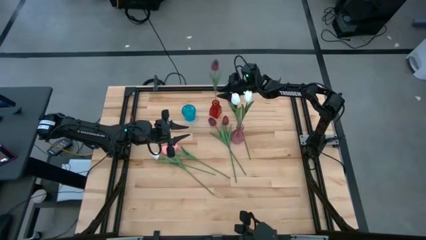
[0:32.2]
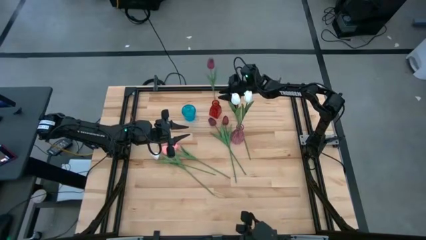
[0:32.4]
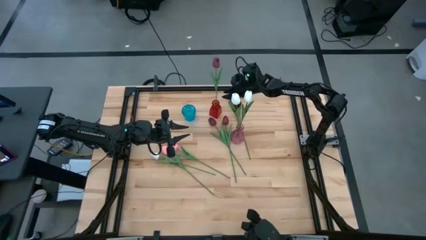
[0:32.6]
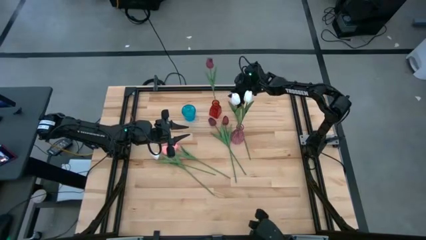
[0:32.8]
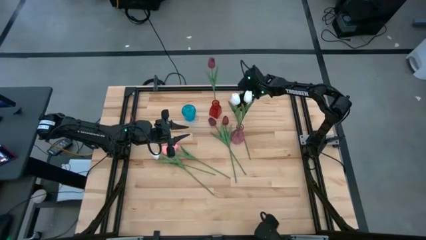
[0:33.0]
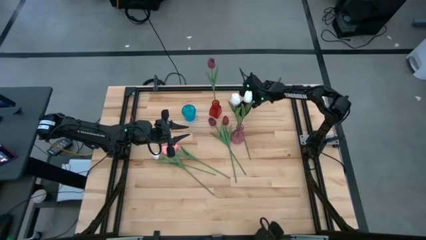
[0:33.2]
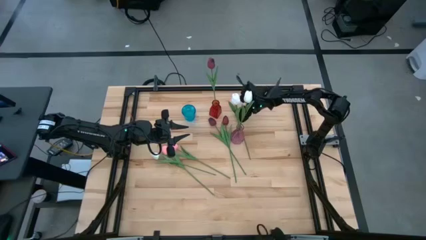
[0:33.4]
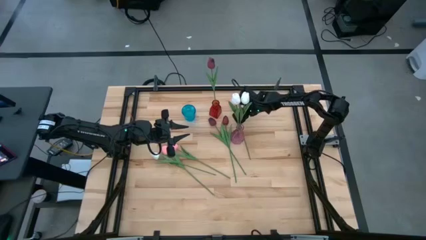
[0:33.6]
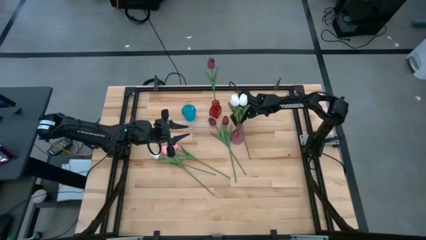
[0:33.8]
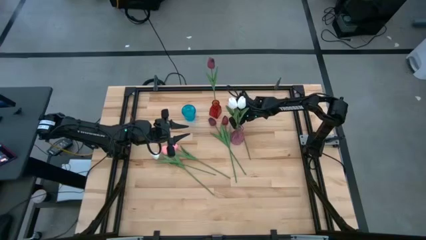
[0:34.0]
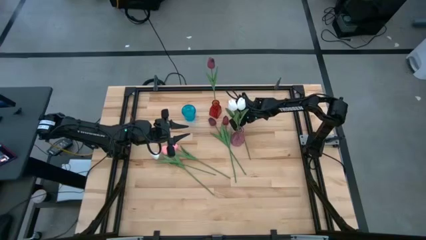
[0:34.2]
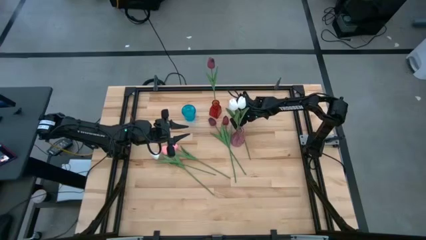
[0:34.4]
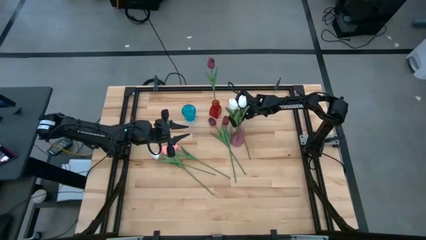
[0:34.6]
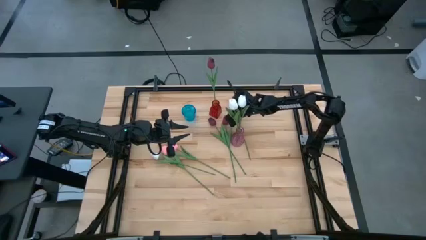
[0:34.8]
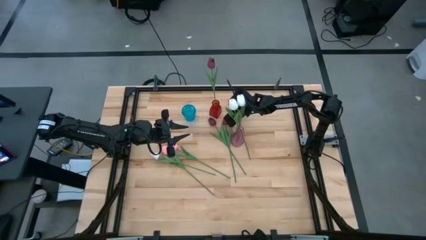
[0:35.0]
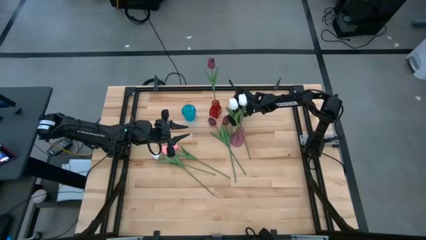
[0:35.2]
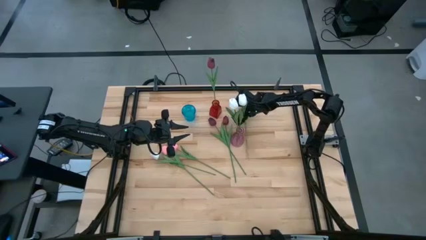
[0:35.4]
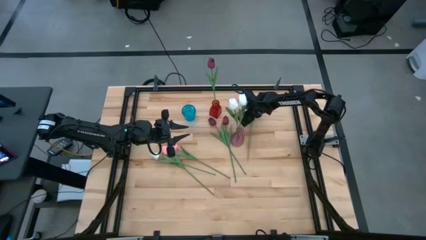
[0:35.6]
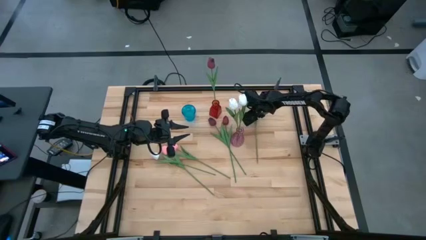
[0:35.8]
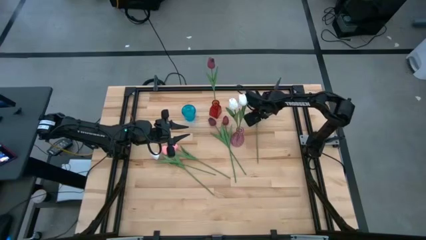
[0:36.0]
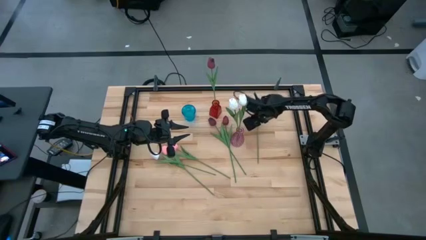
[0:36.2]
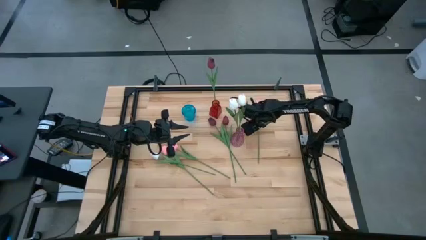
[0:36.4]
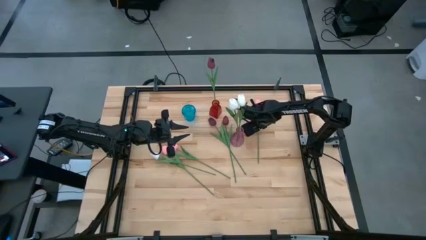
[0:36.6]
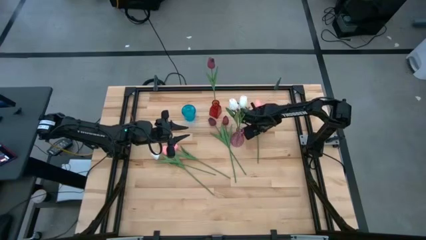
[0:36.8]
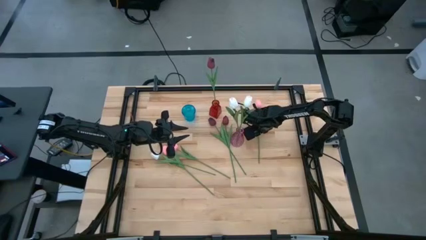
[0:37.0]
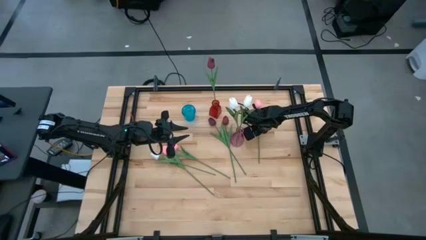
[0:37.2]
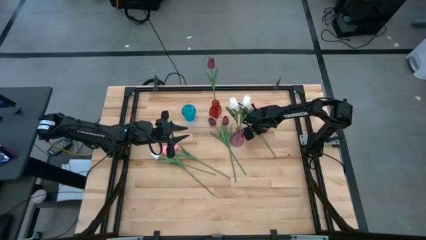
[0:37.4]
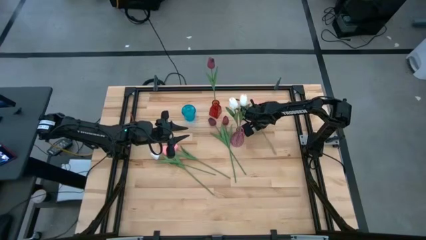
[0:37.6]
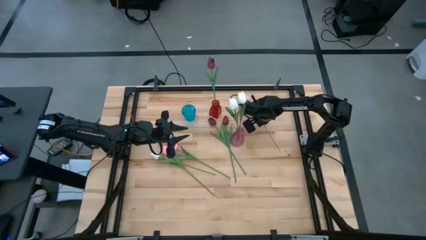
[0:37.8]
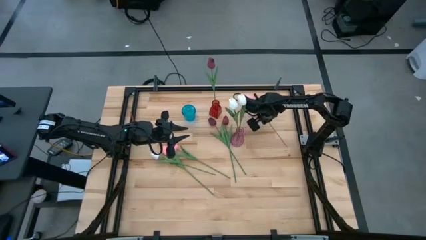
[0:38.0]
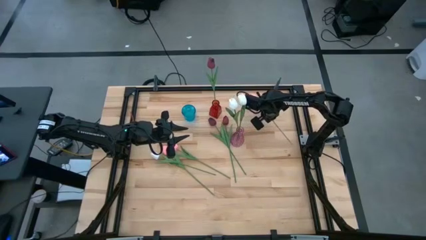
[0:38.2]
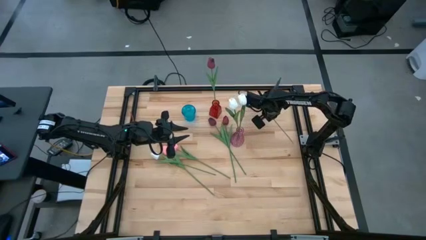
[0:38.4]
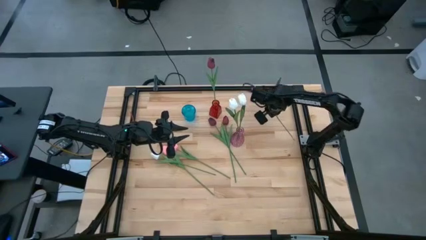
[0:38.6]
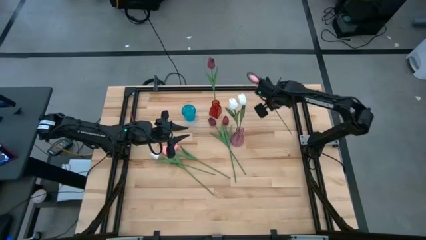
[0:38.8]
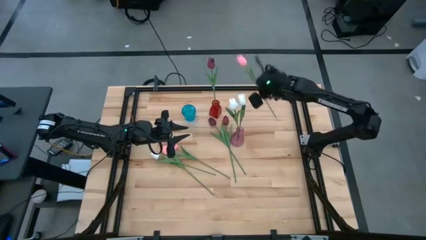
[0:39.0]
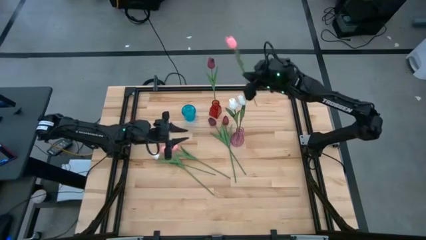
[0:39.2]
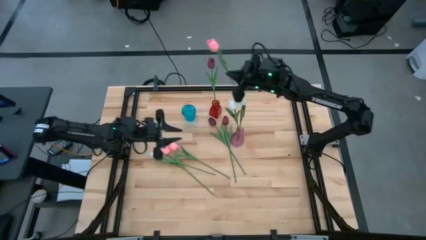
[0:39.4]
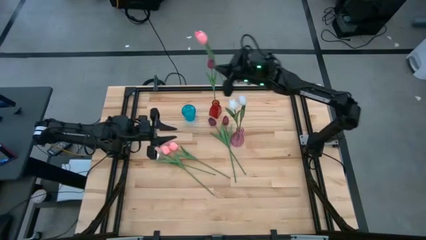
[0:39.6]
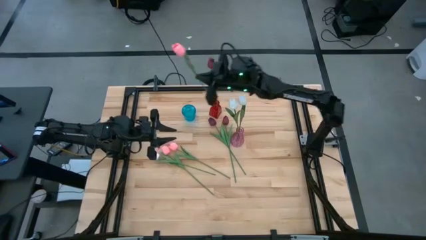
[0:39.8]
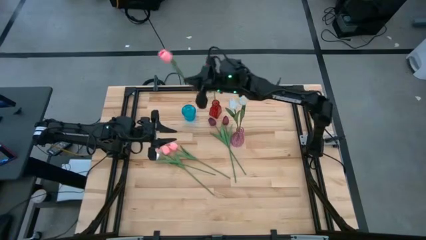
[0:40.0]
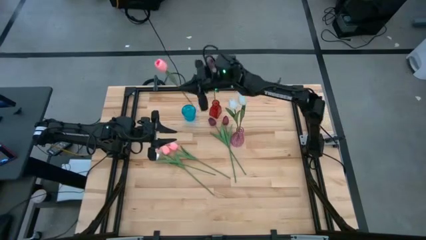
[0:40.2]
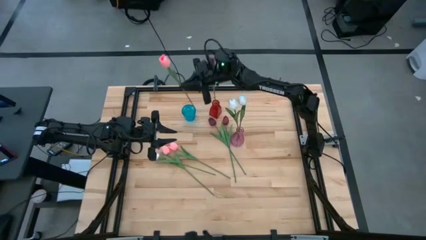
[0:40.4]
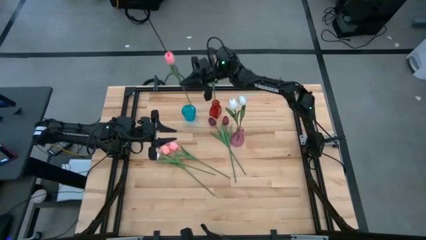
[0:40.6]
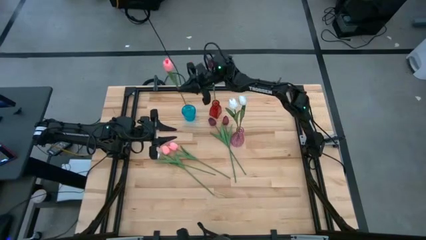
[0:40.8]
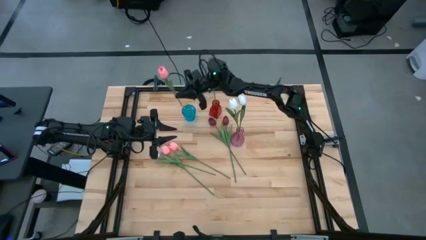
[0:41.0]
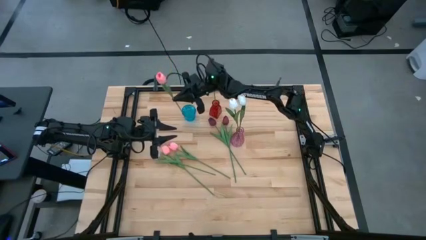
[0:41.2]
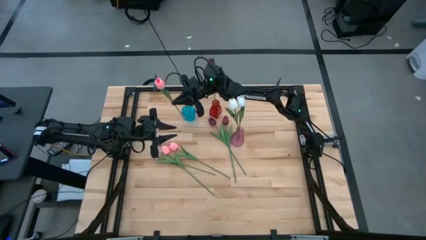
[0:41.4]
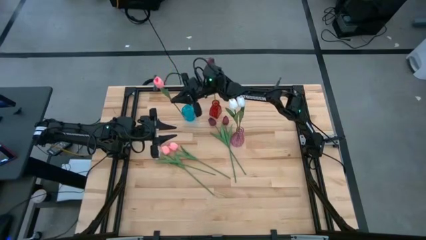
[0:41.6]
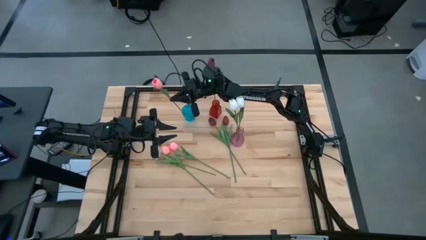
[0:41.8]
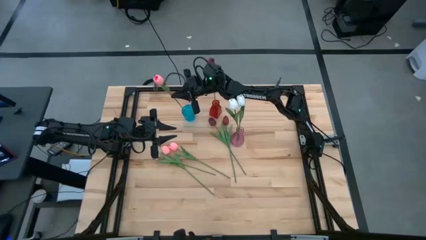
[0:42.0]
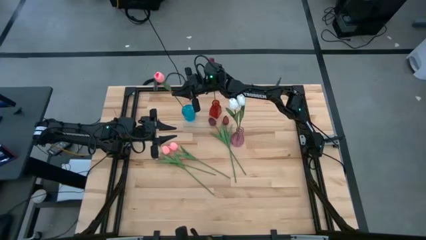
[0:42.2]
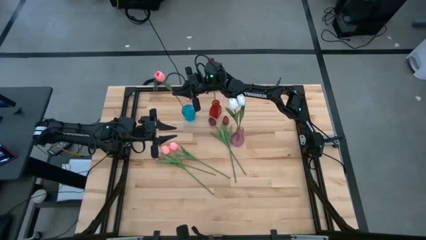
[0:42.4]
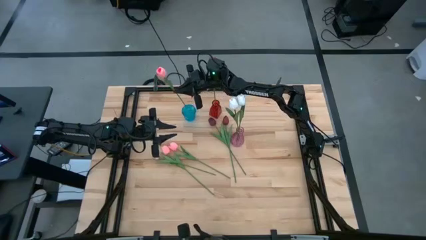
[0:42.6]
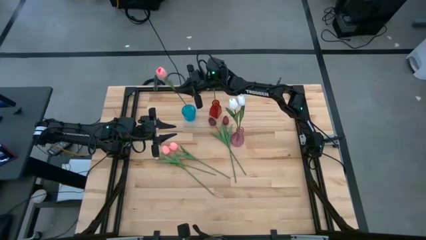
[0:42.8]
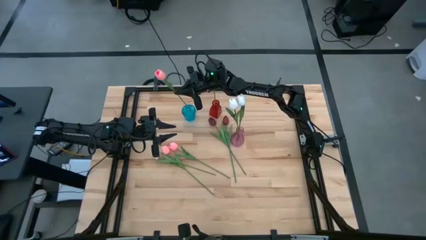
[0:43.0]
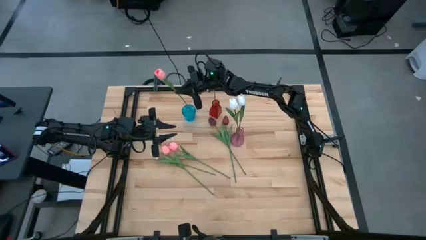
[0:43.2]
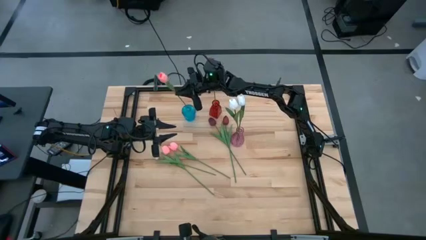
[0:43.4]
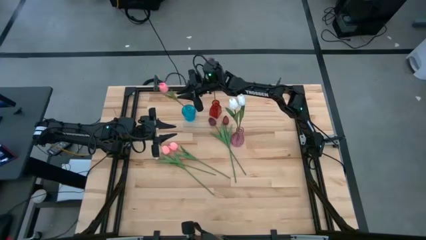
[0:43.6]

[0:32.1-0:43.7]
Task: Sort flowers into vase by color
Put the right pink flower into the blue vase

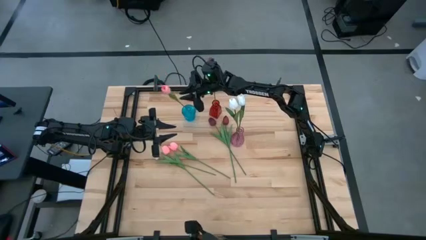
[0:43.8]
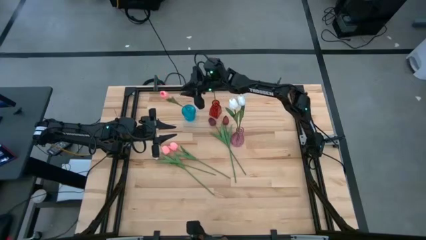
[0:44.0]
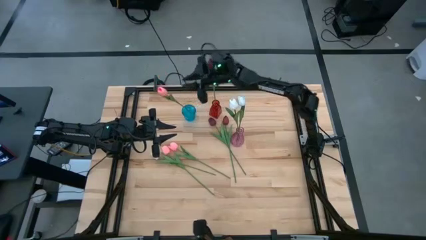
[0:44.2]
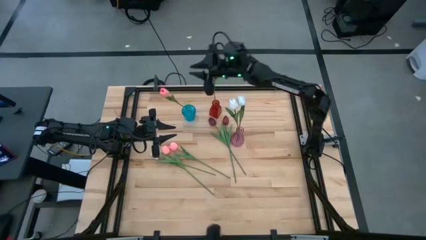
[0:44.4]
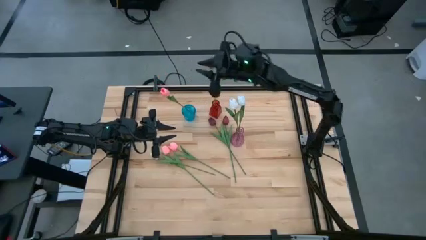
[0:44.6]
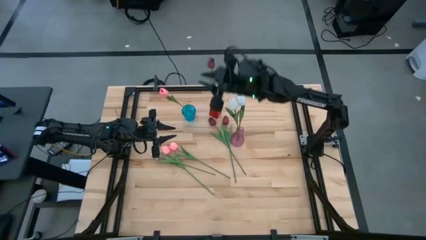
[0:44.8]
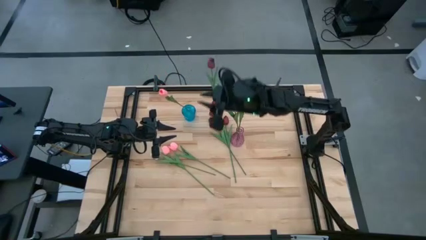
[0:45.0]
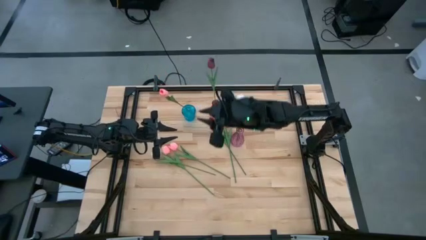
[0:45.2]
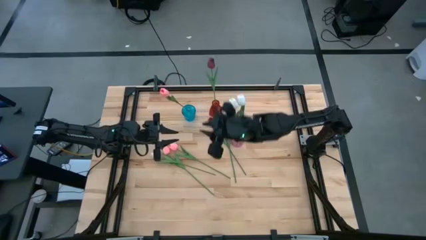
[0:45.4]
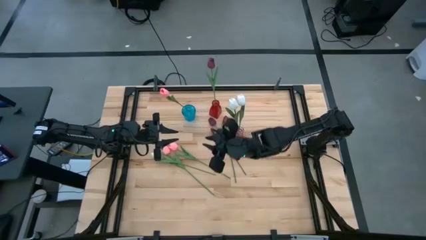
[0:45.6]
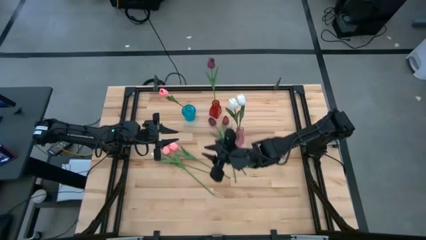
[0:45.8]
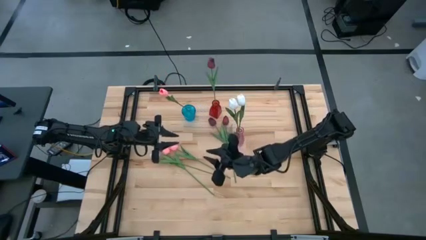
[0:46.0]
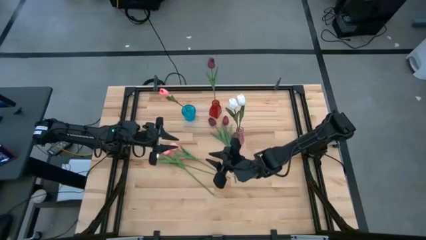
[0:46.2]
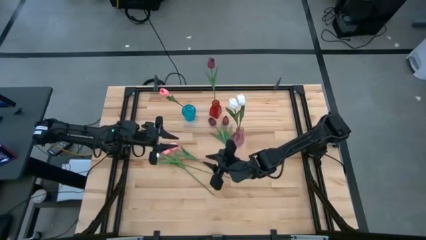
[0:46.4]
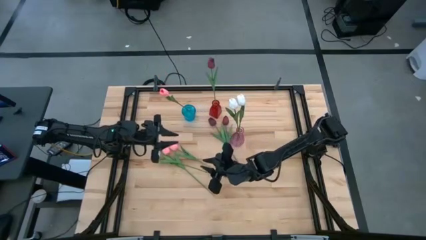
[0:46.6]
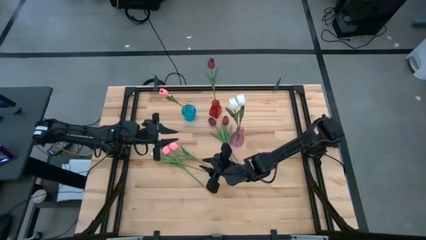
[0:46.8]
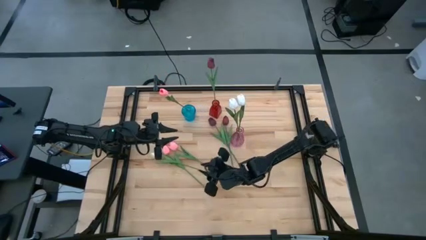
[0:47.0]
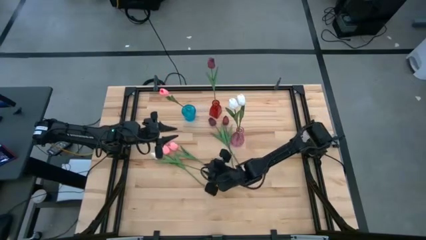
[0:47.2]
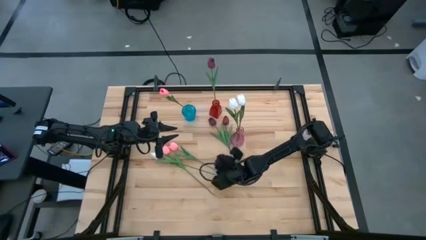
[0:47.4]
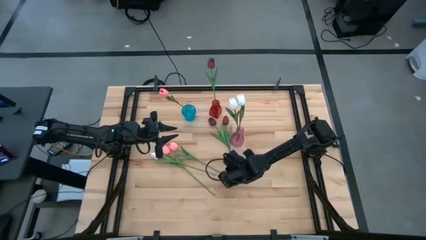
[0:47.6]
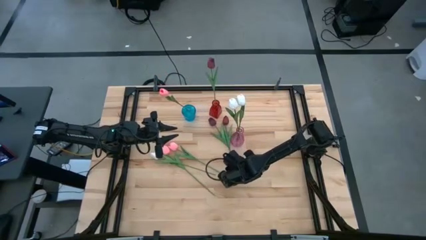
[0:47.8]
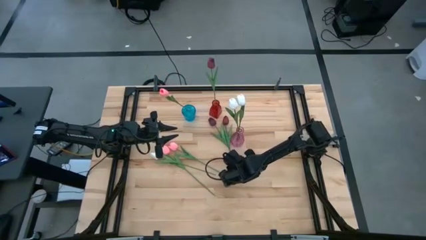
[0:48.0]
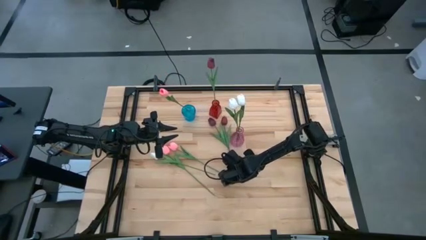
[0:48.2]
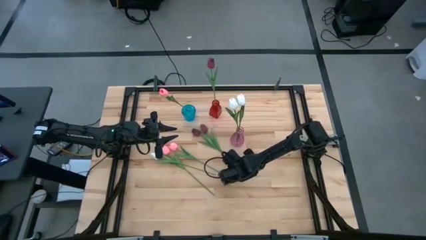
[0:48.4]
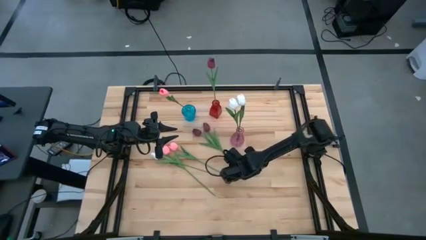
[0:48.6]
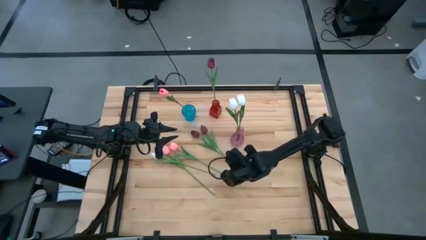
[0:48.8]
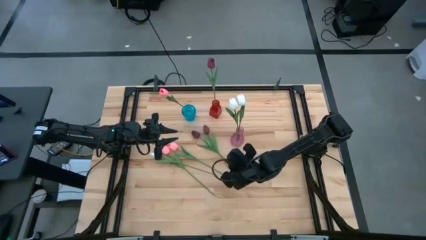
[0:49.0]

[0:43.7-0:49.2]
Put the left red flower into the red vase
